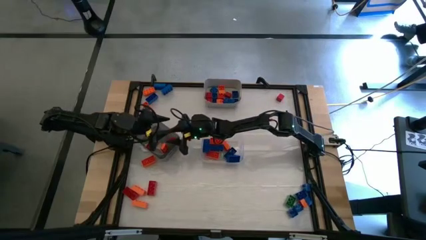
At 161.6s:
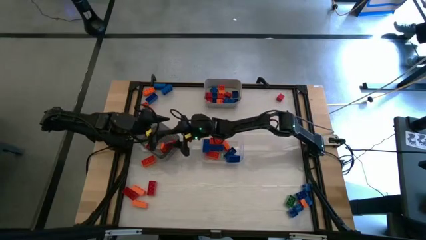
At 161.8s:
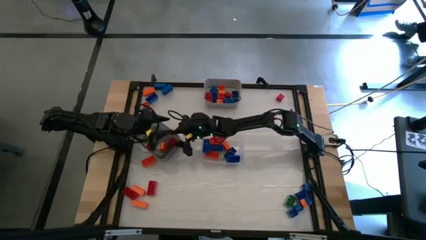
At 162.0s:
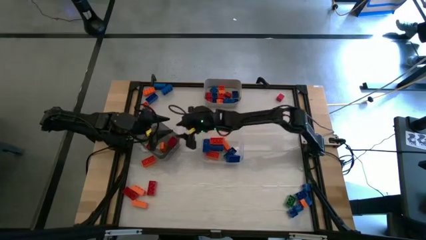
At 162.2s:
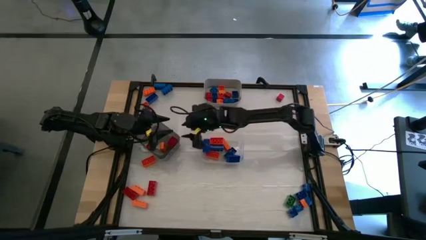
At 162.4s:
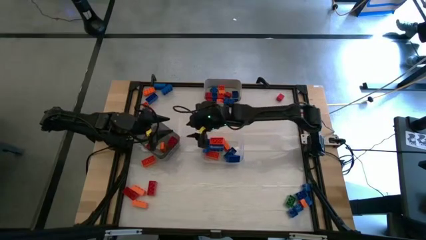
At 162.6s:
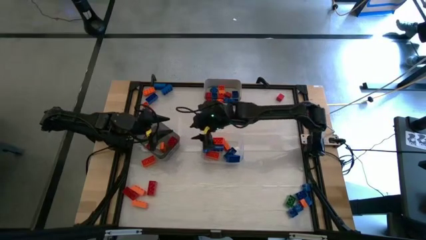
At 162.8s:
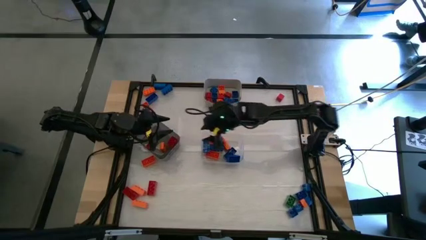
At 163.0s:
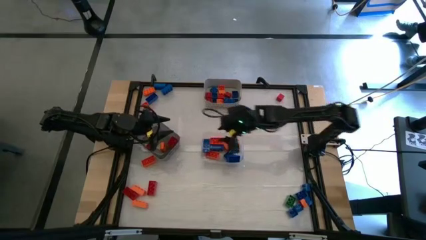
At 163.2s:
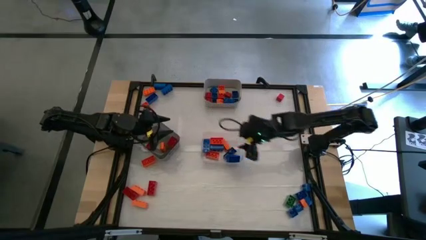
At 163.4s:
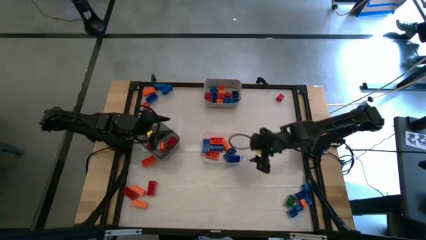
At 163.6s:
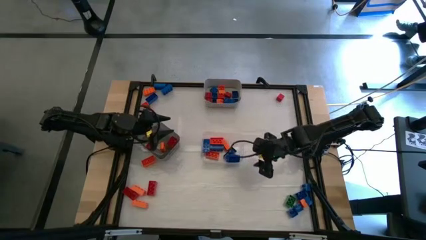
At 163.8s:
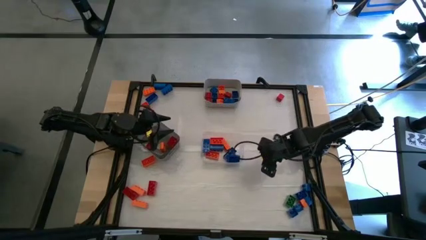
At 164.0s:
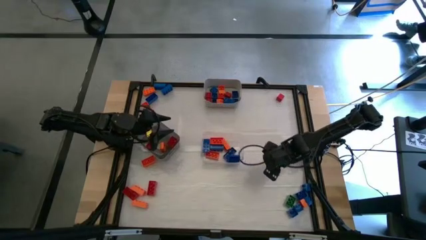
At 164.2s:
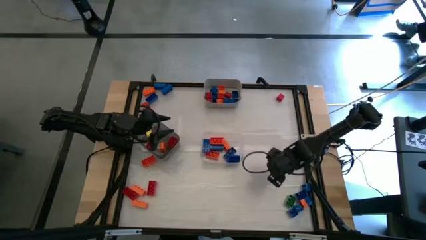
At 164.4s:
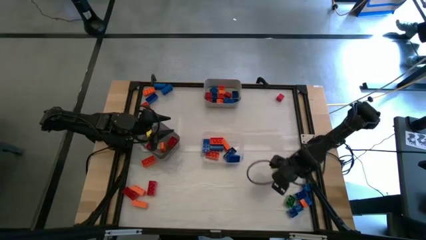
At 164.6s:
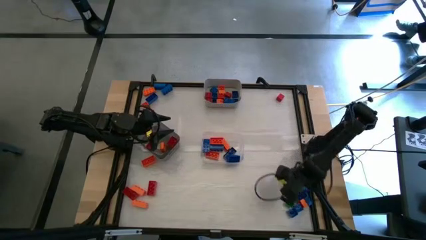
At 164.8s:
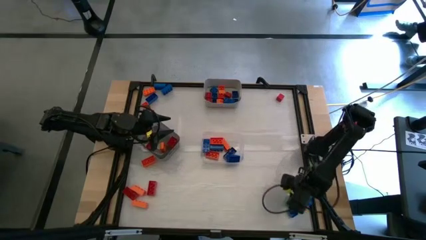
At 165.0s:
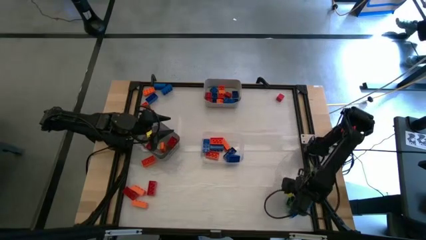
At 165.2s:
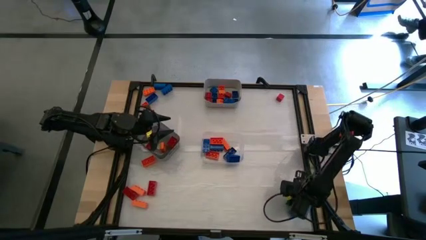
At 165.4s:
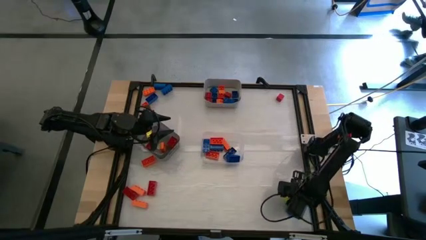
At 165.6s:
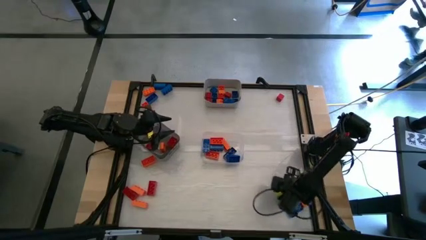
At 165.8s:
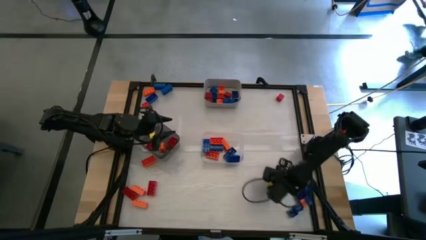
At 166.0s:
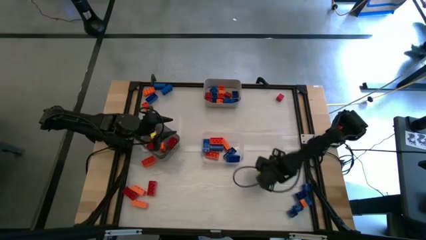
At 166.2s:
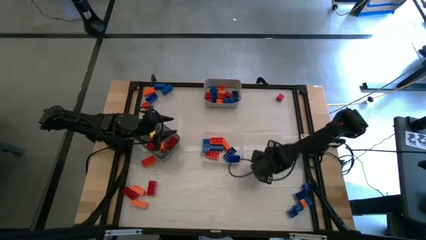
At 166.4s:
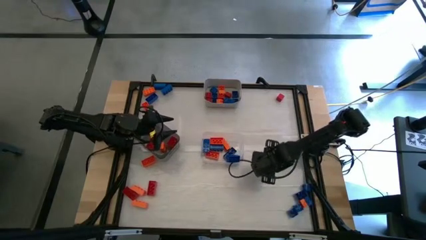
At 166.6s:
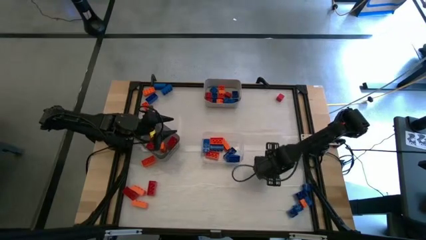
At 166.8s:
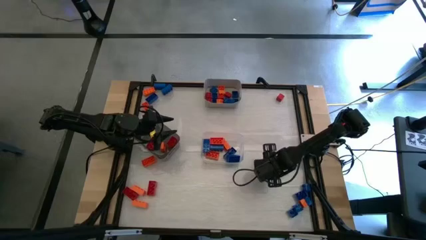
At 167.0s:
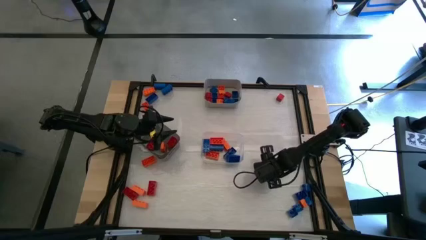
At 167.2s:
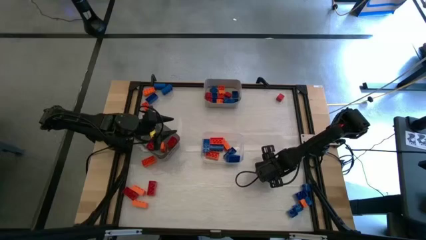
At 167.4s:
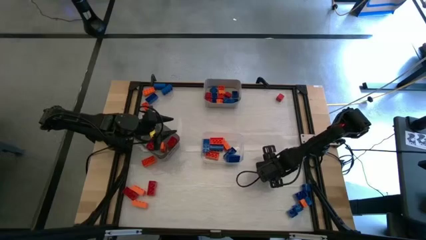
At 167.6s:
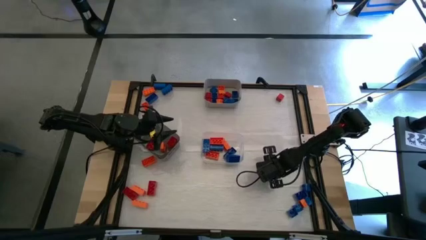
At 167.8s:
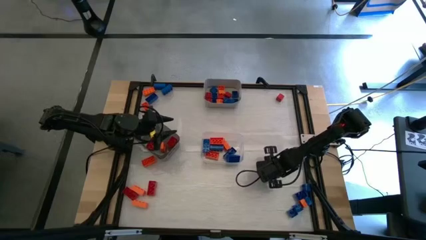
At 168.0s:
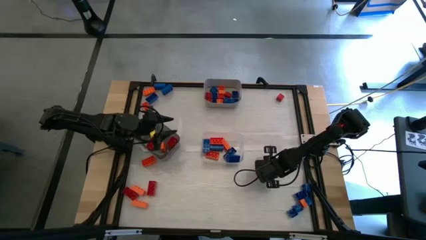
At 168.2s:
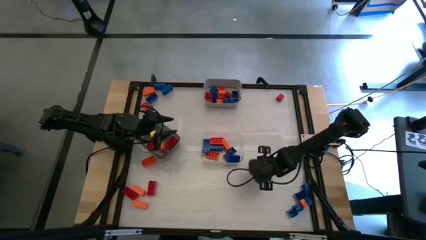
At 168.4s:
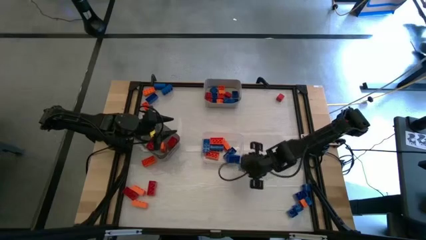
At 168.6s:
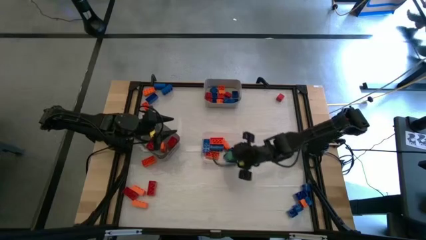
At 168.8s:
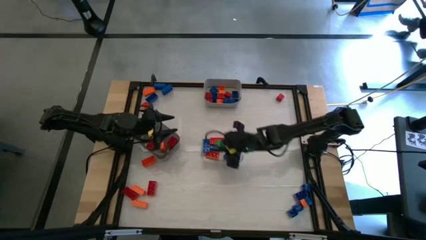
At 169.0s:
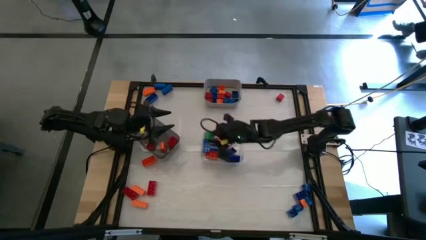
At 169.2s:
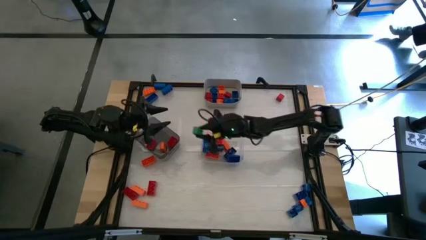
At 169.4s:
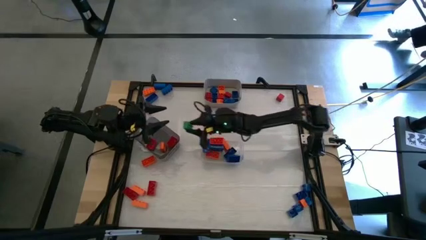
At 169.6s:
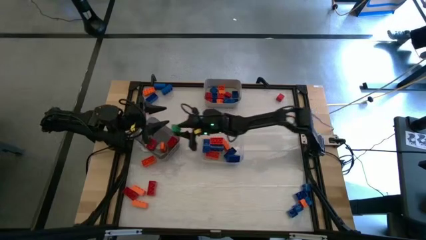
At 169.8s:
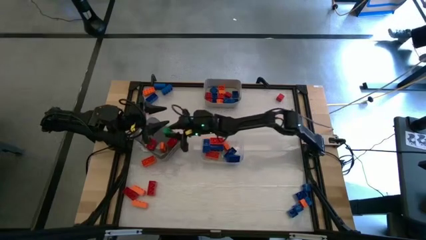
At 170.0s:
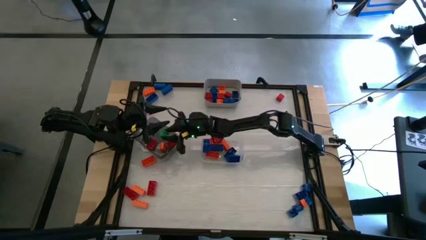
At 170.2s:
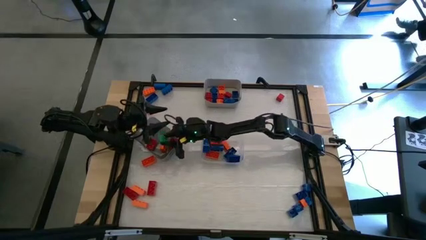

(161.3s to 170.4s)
Task: Sort blocks by size
Put the green curved game piece into the black bin

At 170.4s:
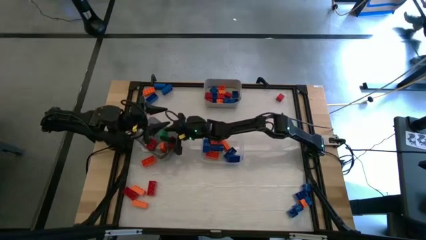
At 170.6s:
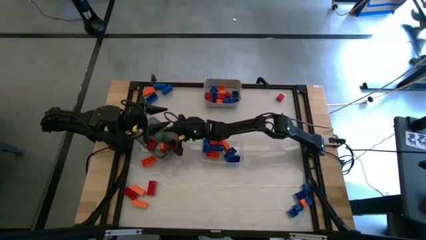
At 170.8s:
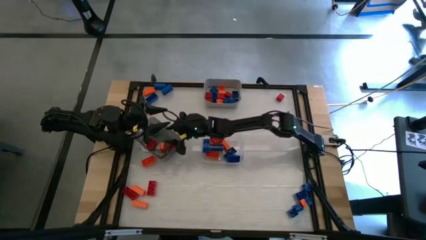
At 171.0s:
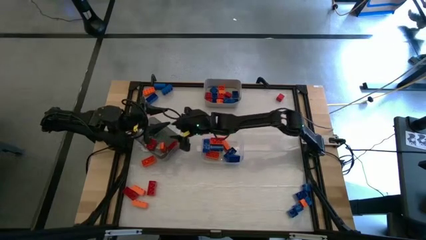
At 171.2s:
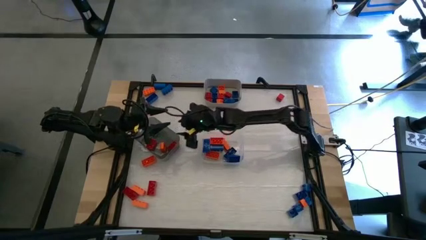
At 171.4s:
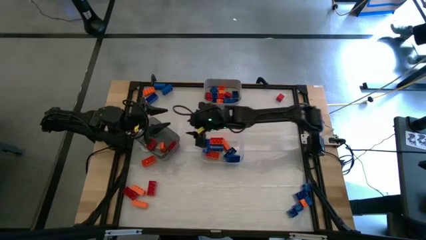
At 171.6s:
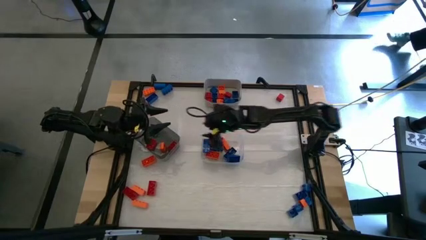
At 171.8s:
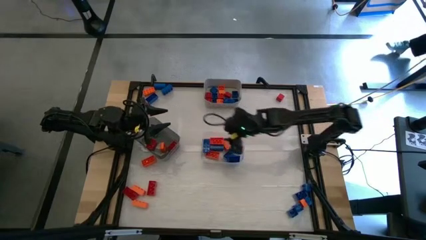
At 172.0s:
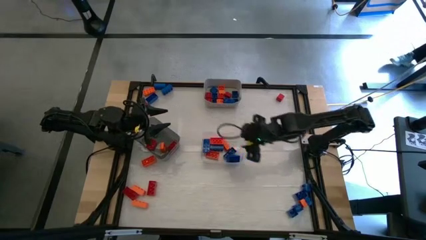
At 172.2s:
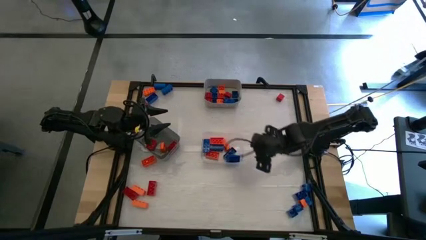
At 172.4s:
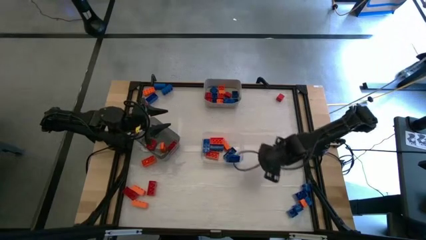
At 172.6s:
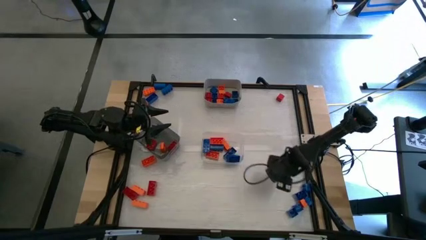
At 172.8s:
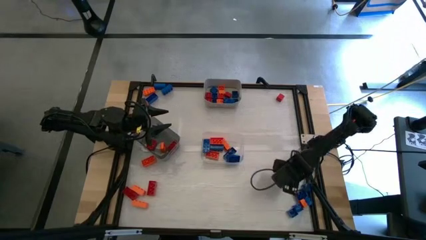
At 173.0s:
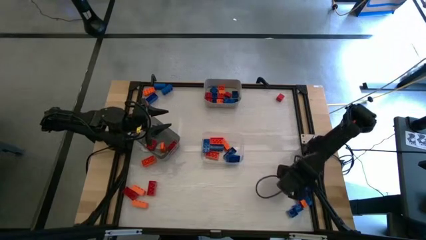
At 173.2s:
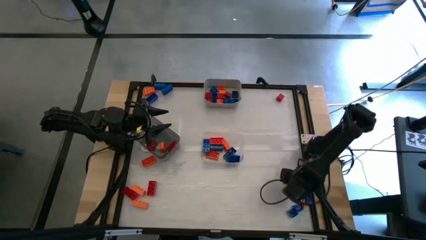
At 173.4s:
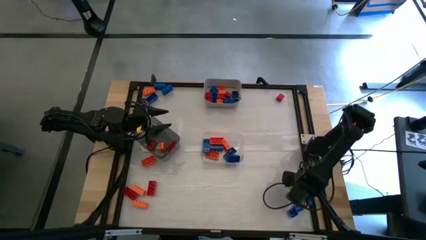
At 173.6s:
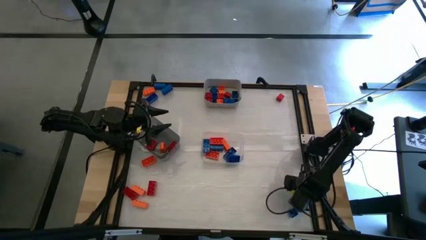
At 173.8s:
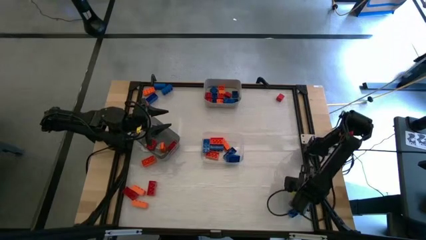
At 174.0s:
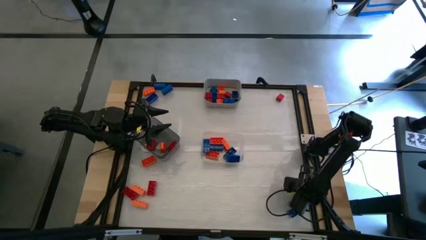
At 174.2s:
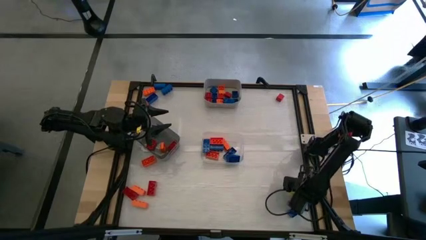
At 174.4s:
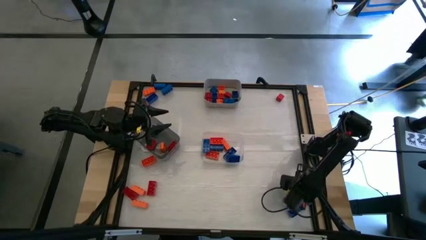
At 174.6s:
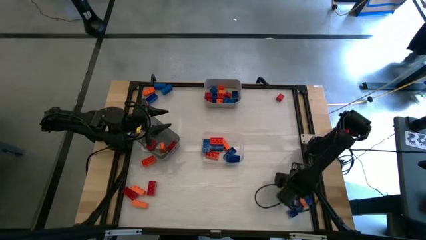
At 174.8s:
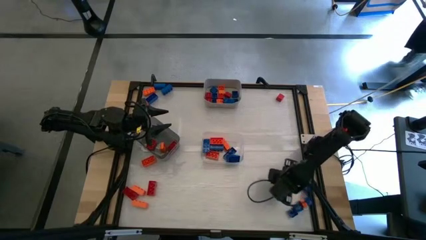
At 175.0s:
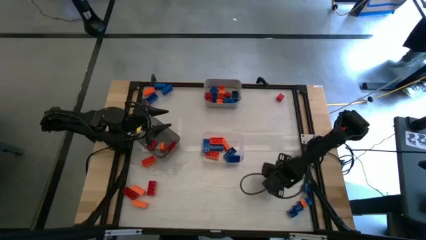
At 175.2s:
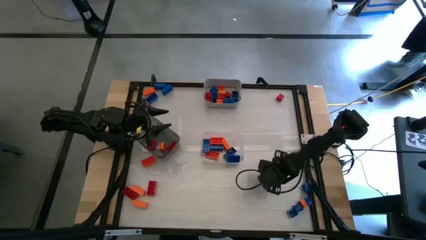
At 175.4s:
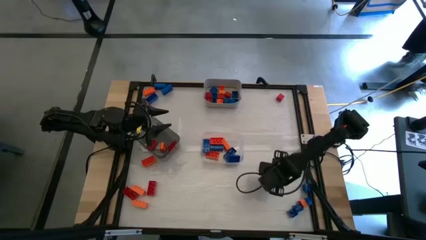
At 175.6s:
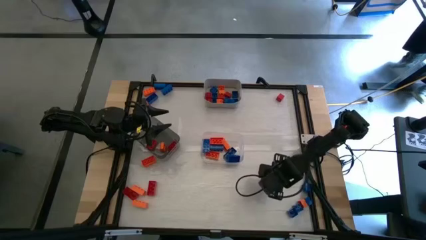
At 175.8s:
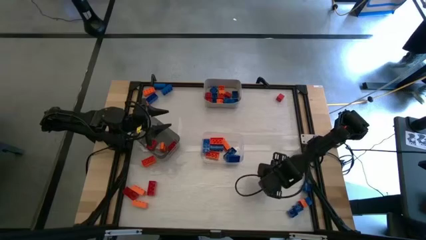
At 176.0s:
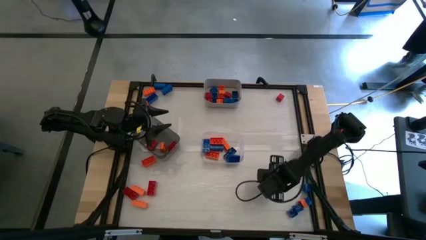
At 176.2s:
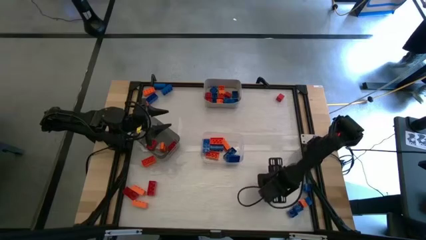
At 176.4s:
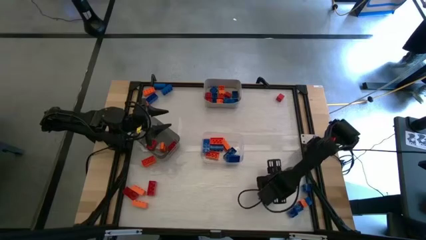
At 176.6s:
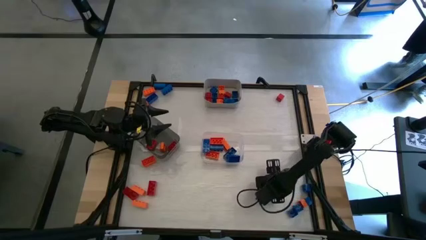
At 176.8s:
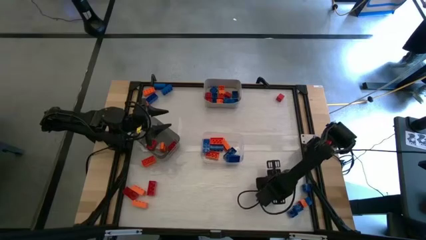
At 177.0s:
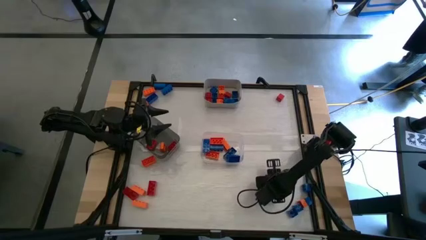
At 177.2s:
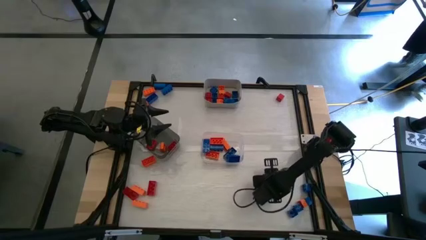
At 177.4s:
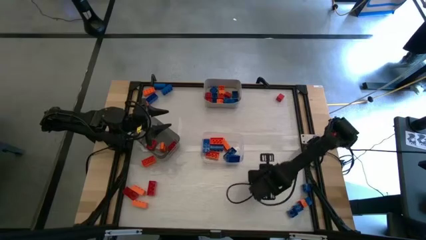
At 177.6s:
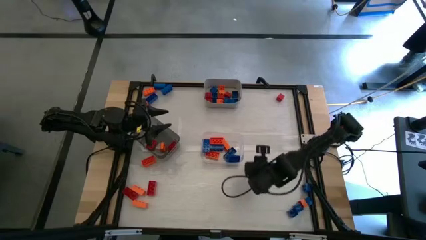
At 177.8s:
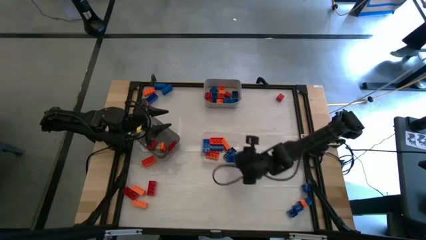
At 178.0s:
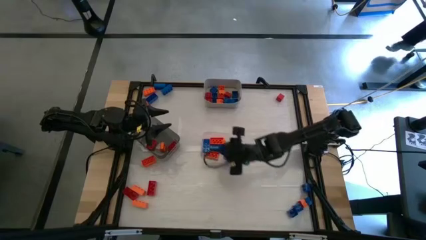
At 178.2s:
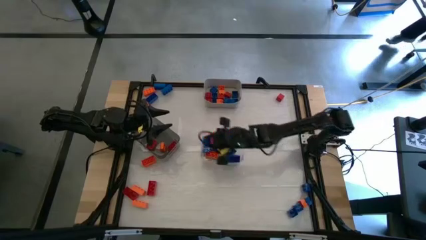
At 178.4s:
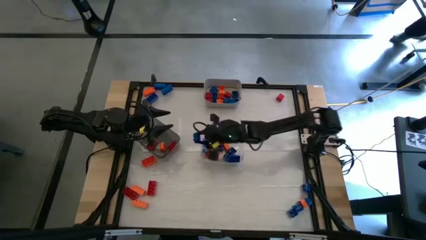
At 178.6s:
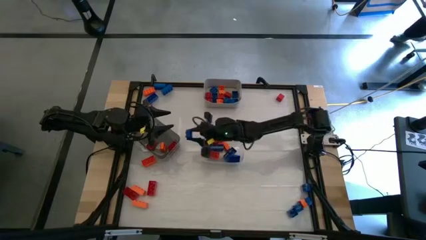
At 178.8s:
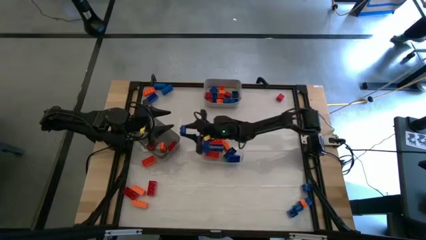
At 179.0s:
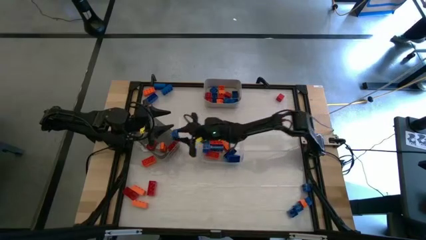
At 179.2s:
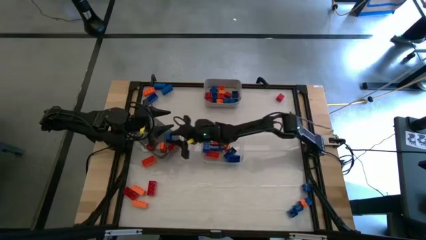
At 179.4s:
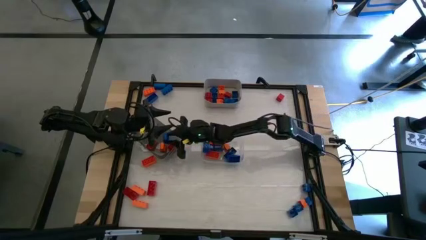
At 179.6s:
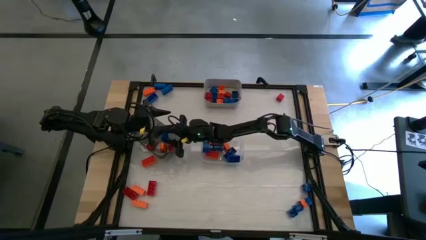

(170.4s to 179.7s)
Put the blue game piece into the black bin
